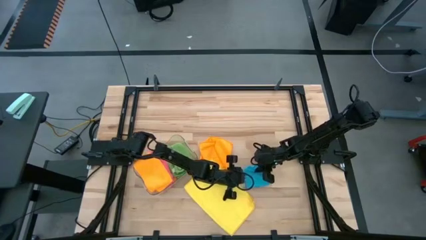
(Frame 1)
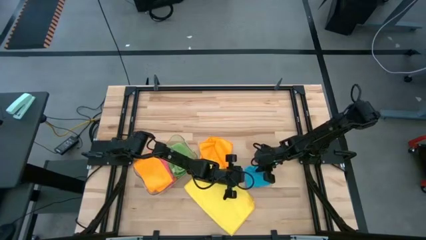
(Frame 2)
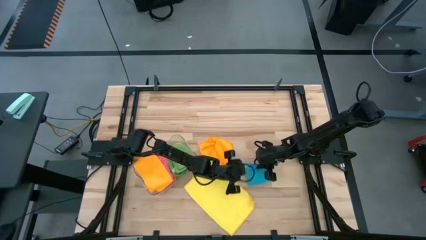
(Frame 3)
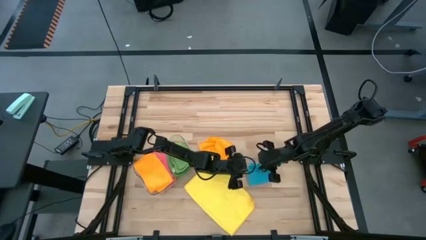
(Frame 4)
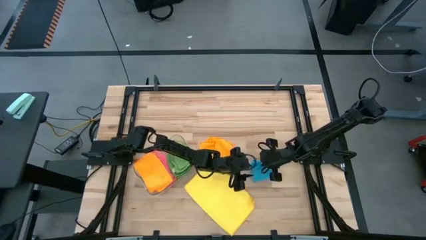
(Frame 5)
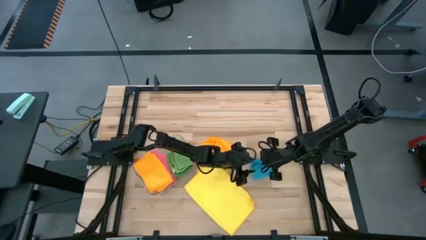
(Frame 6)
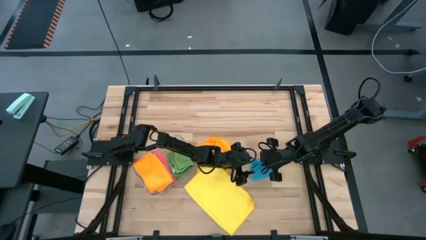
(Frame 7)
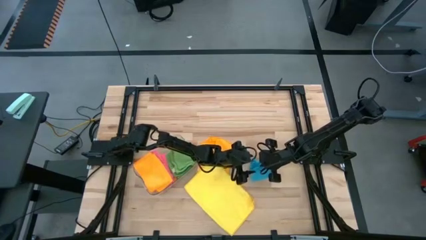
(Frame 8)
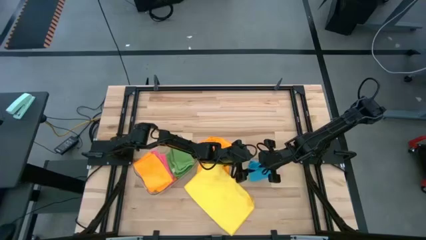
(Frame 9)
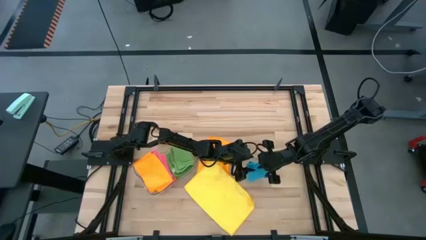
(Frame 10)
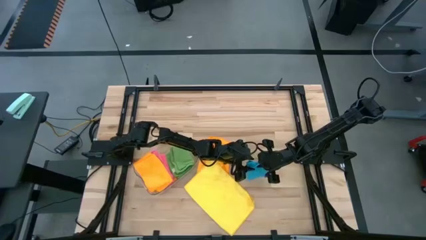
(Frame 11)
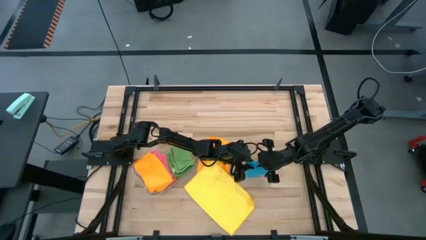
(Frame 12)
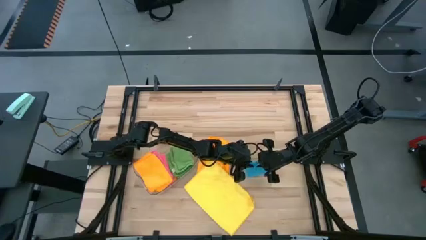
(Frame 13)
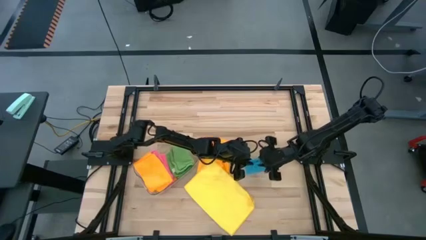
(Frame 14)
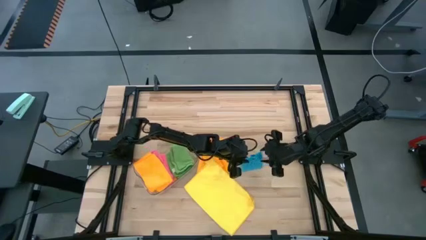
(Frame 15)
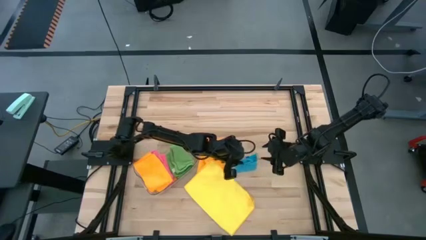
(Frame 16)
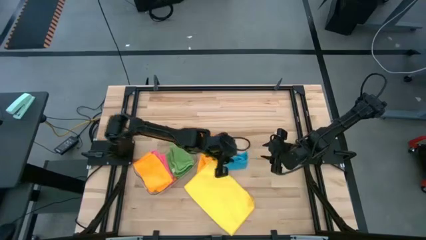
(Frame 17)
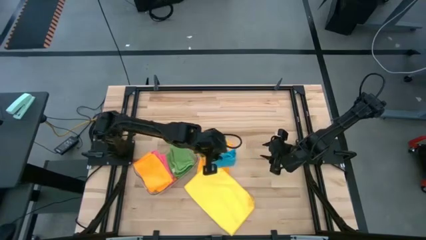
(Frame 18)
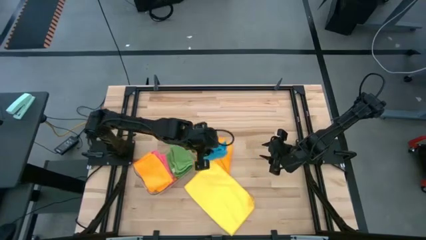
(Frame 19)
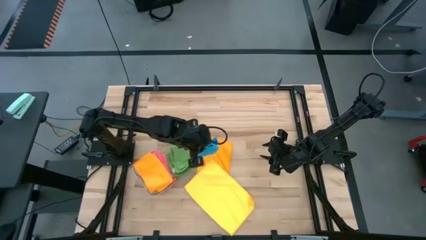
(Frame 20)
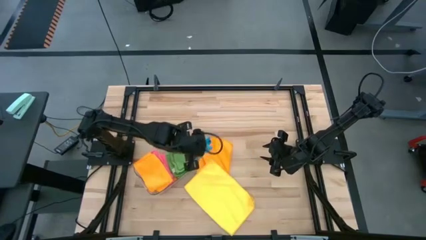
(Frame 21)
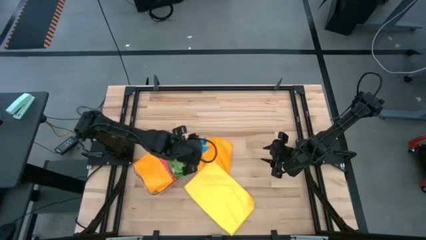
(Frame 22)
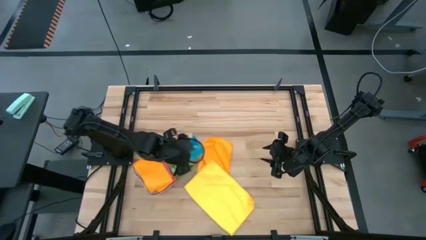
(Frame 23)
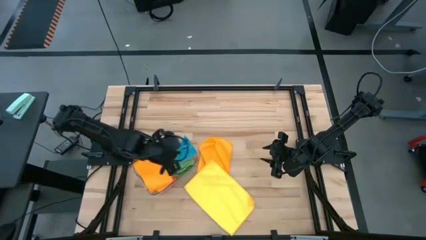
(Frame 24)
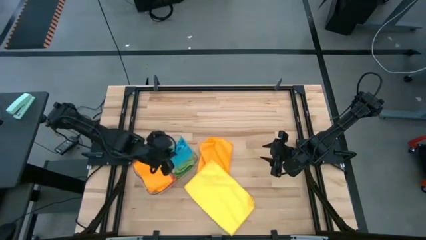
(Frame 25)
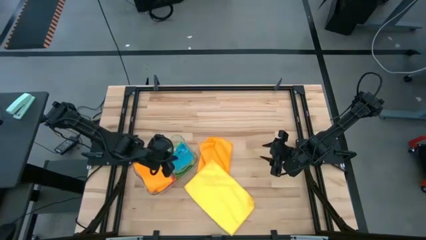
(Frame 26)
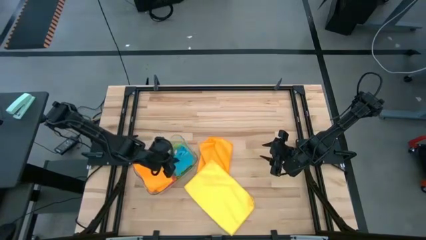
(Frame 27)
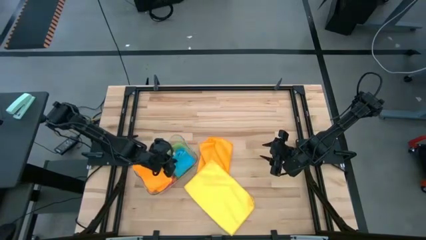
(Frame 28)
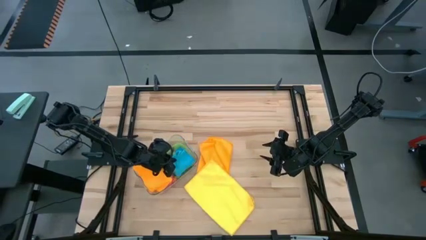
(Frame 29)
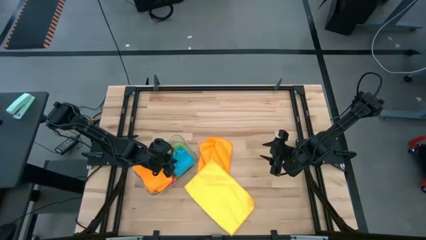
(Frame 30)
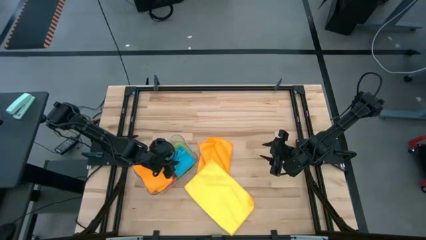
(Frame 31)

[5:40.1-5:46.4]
Task: Fold microfiber towels
Put the folded blue microfiber cloth into the transparent bin

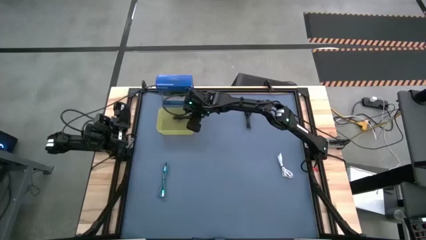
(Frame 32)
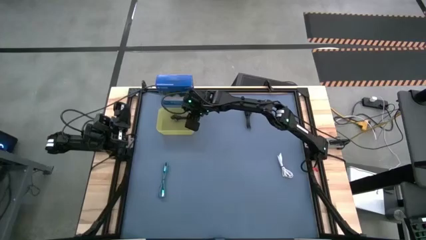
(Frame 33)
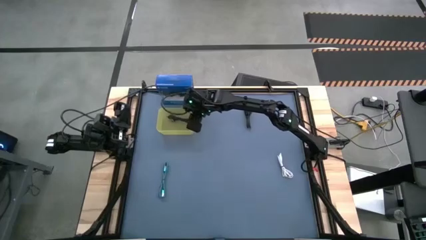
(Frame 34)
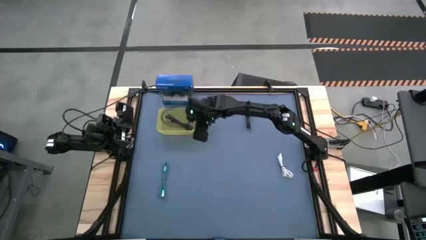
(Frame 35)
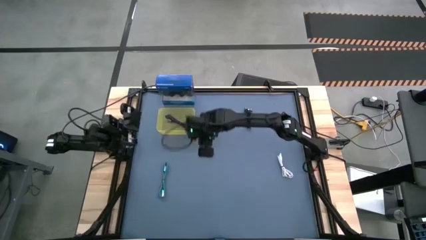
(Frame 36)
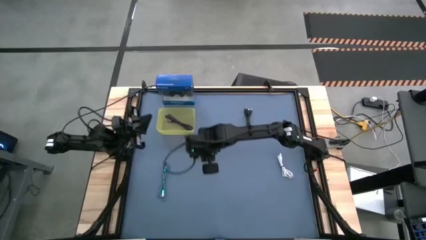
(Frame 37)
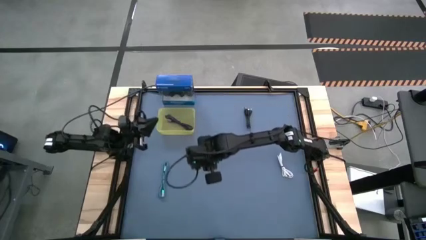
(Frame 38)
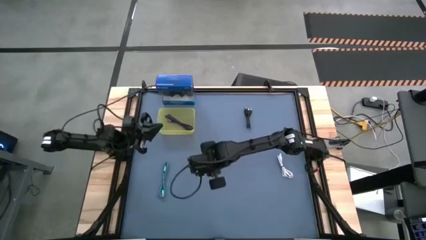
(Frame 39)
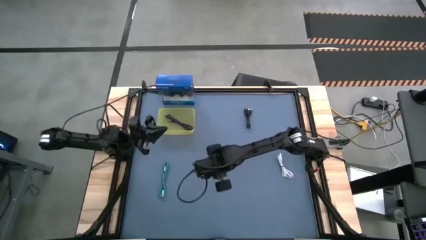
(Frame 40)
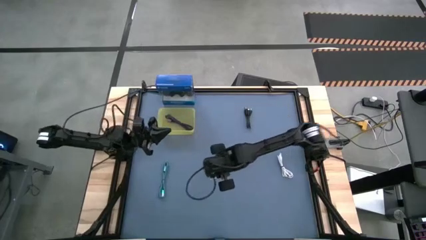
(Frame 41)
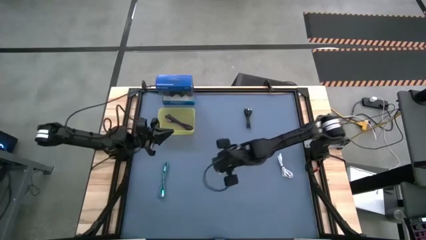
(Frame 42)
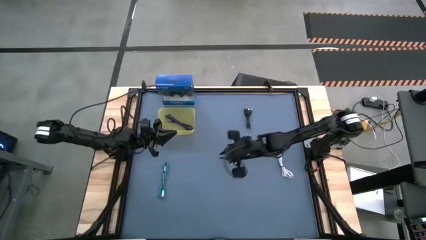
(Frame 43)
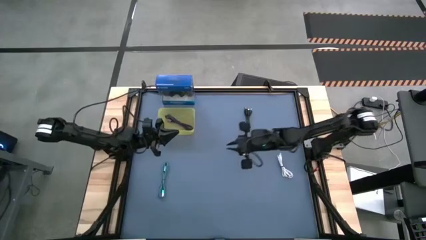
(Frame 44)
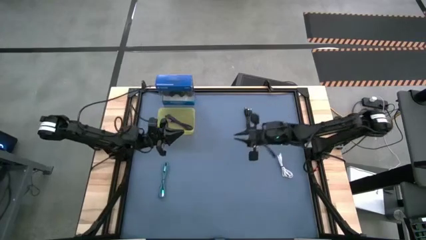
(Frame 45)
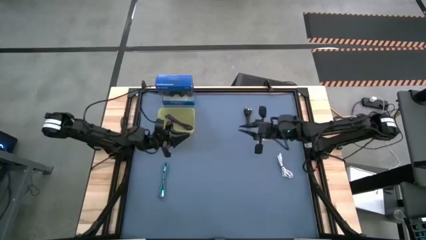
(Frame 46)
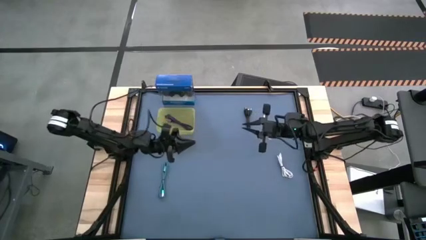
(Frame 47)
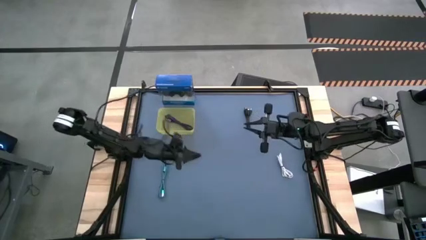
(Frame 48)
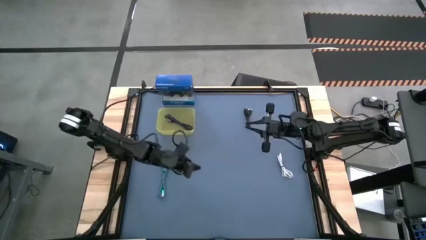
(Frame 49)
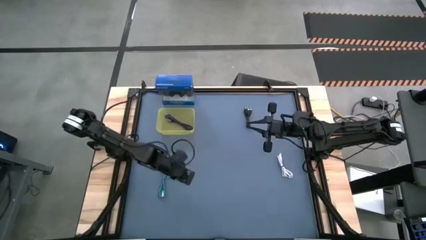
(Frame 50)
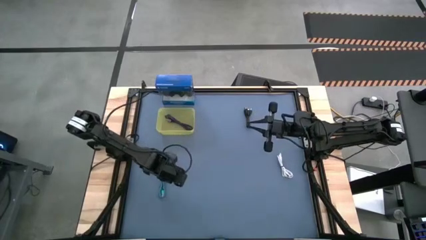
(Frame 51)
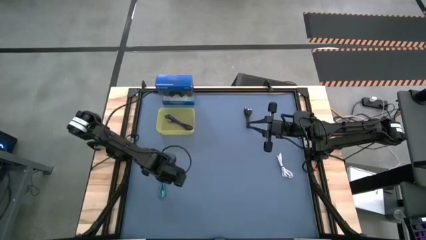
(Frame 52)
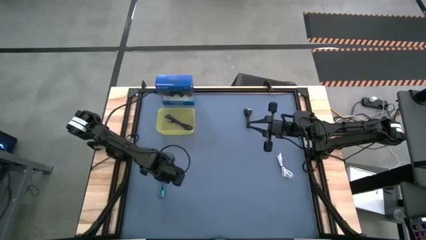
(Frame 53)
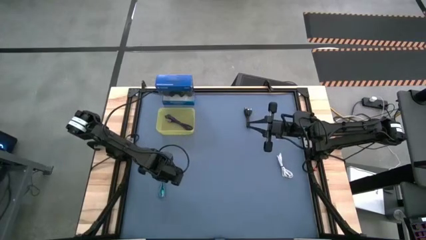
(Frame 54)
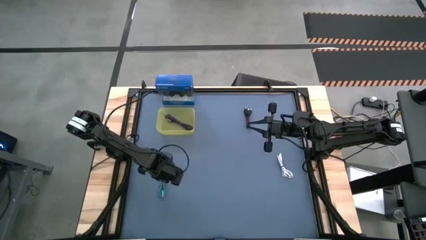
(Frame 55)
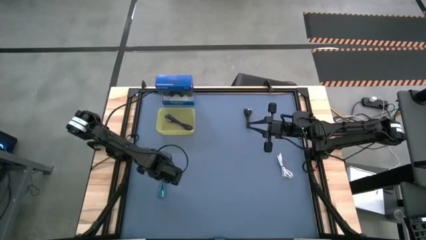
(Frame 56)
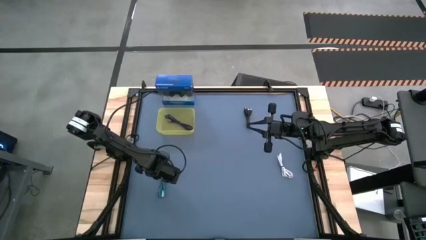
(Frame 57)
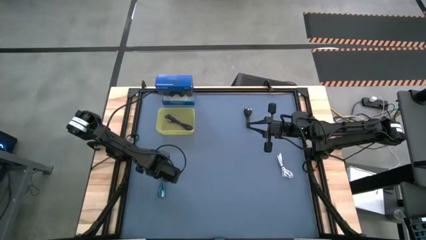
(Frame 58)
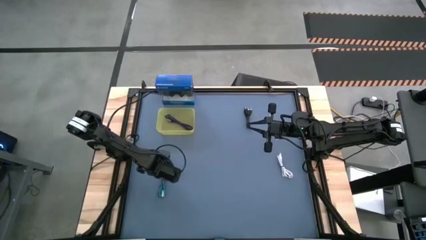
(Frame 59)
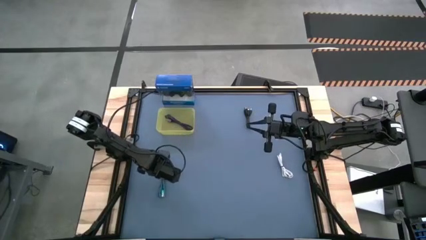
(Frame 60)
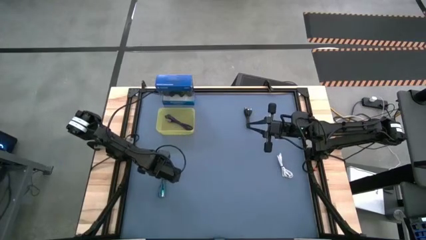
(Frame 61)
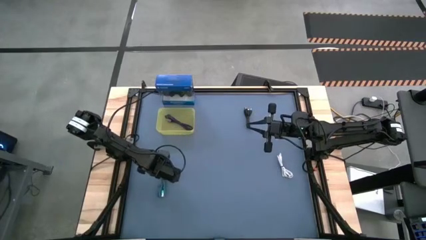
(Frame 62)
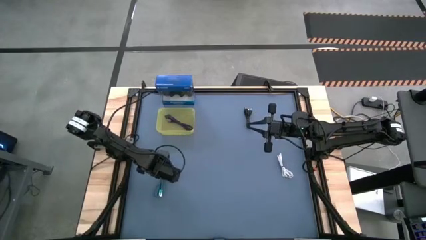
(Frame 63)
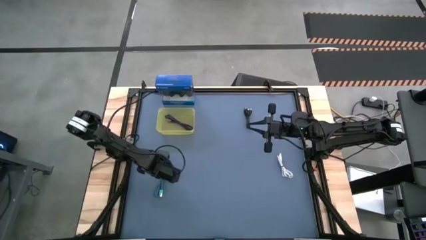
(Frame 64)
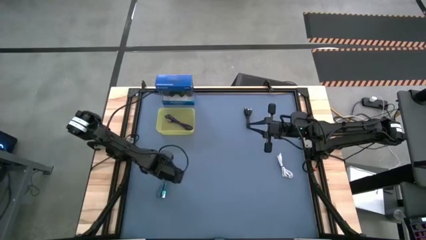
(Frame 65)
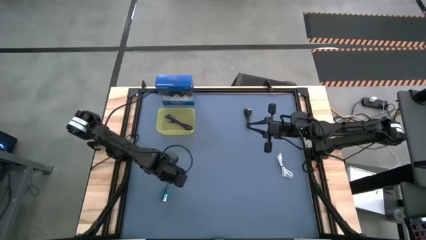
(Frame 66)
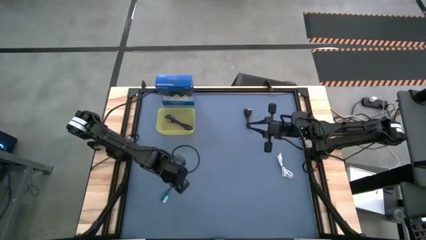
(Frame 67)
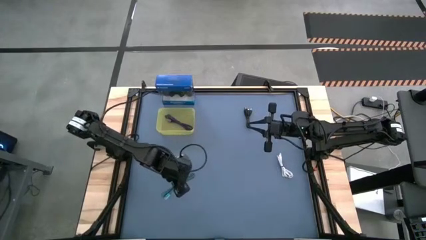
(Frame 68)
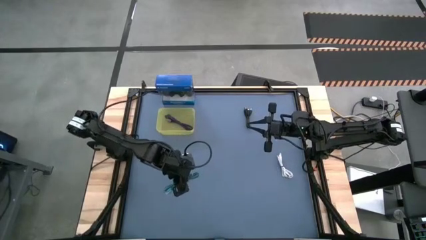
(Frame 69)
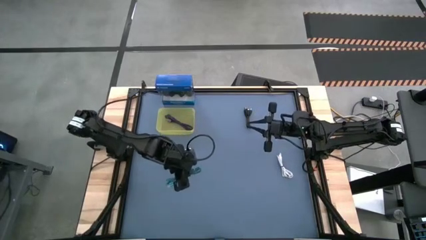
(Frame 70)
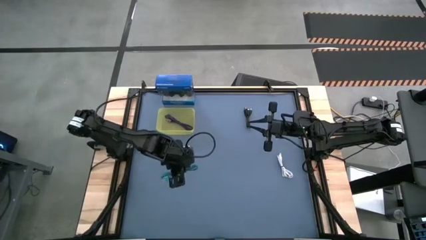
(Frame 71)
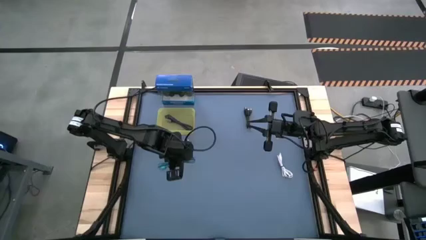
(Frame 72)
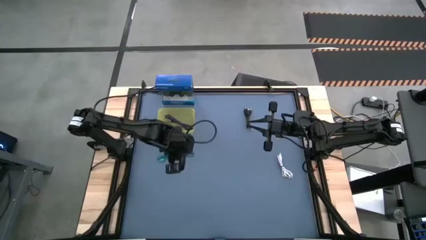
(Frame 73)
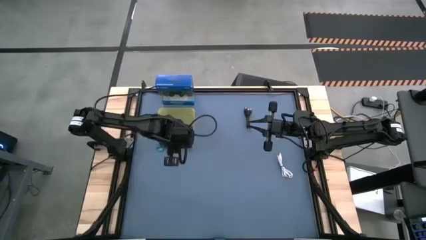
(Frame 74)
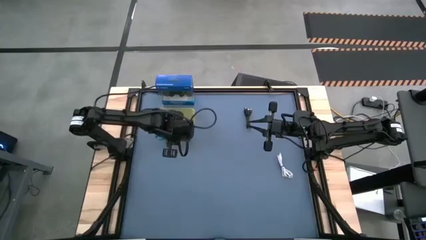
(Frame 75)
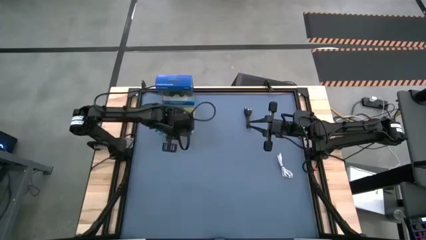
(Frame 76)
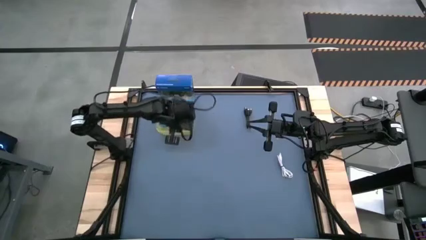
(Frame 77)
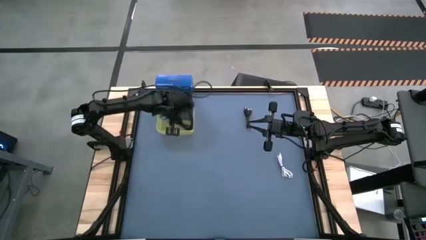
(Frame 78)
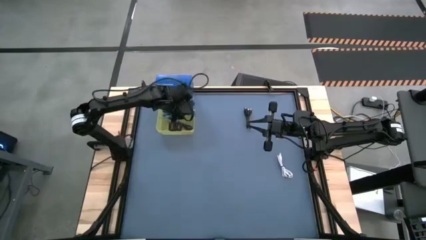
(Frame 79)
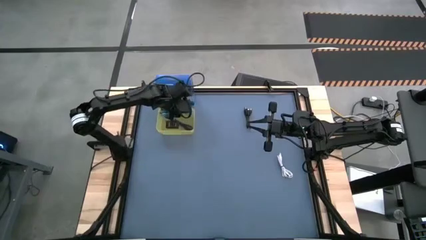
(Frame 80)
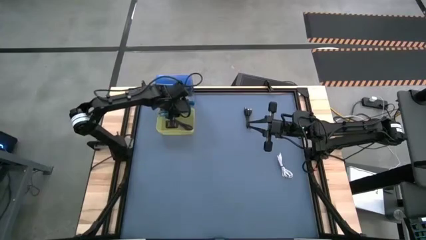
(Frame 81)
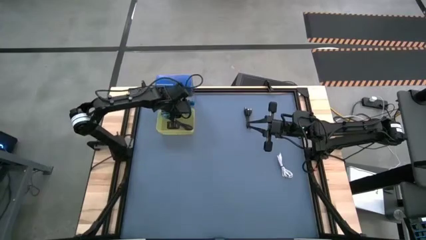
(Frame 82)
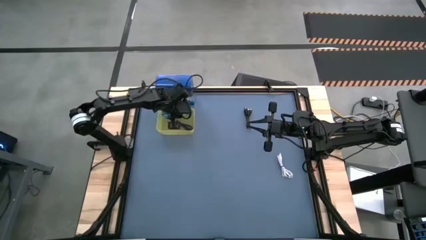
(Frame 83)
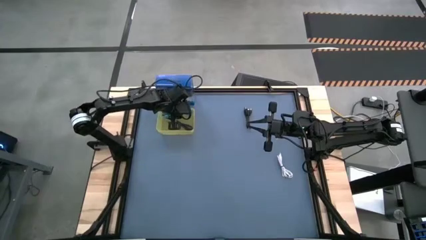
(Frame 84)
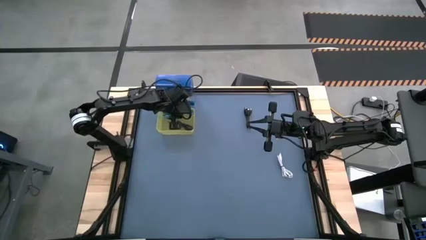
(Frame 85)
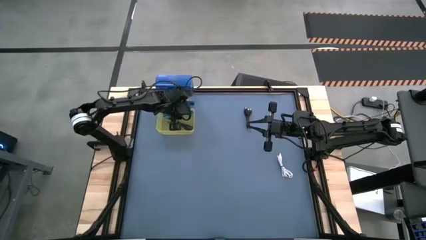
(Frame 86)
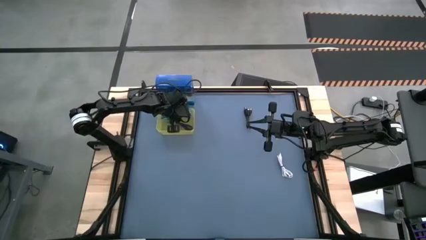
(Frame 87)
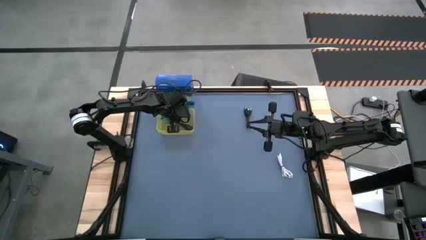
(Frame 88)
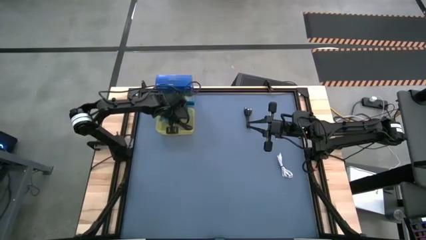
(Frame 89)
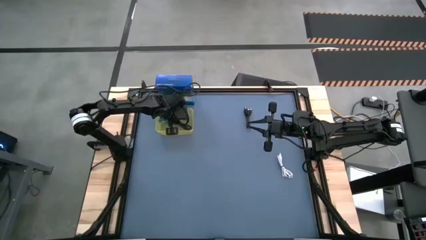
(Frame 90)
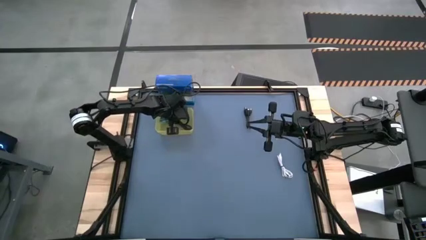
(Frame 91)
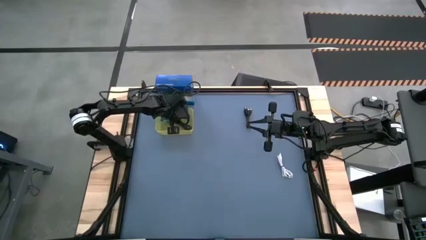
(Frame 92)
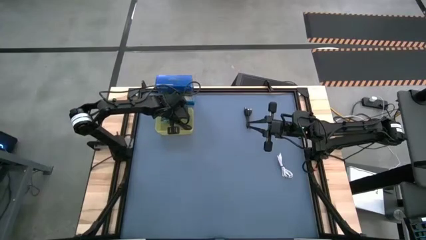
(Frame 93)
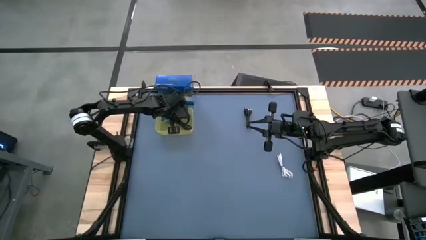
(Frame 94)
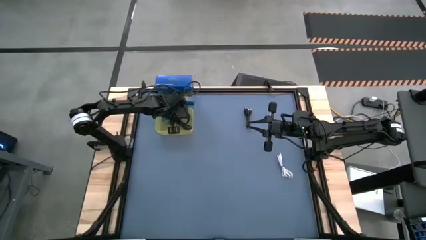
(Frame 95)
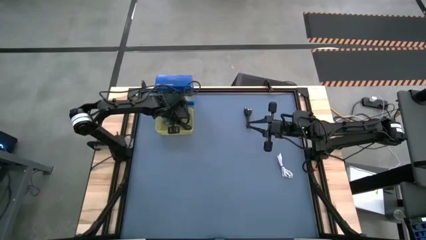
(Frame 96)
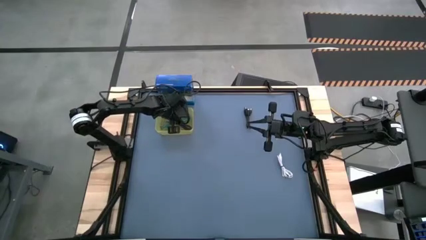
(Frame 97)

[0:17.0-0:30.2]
Task: Pick and place USB-C Cables
Put the green charger cable into the yellow bin
